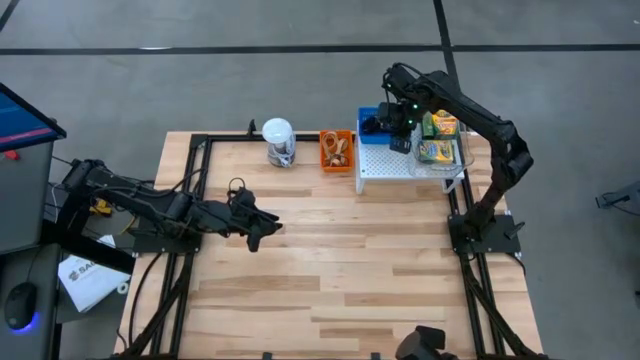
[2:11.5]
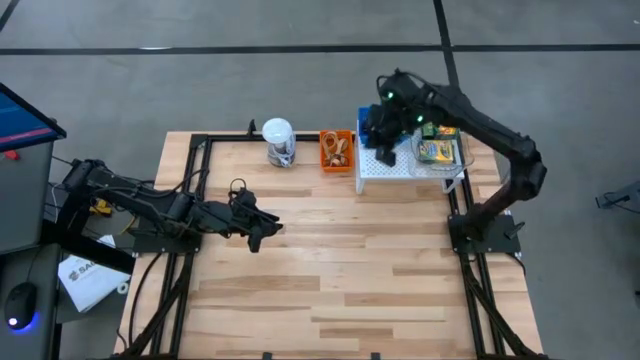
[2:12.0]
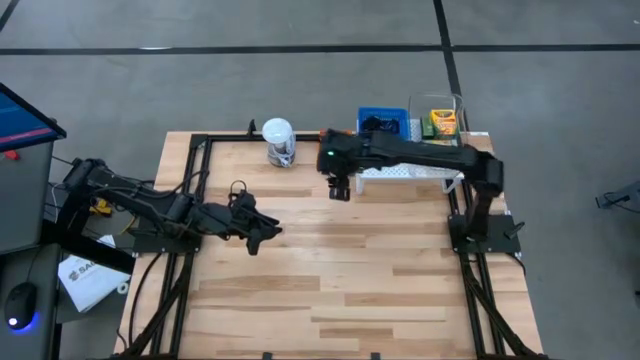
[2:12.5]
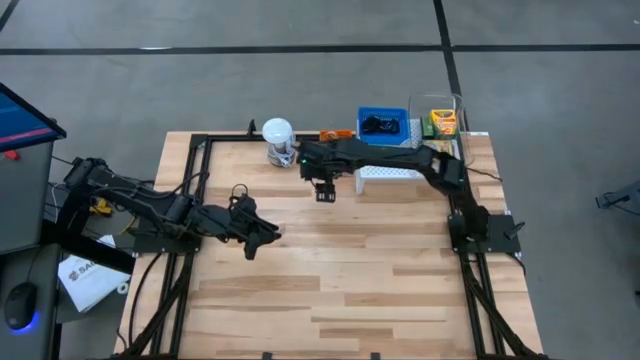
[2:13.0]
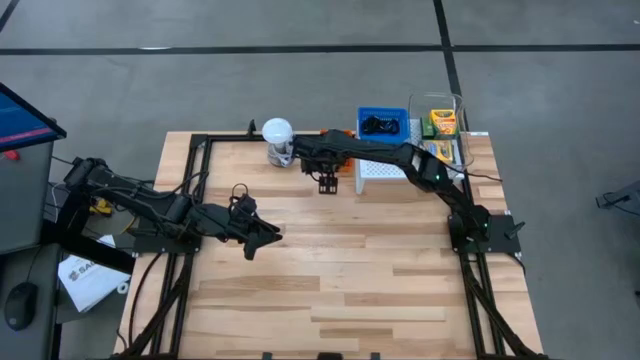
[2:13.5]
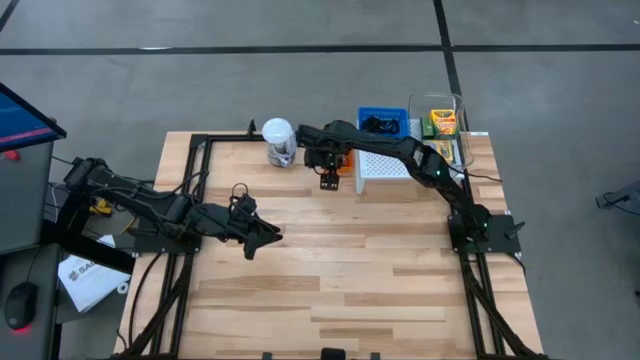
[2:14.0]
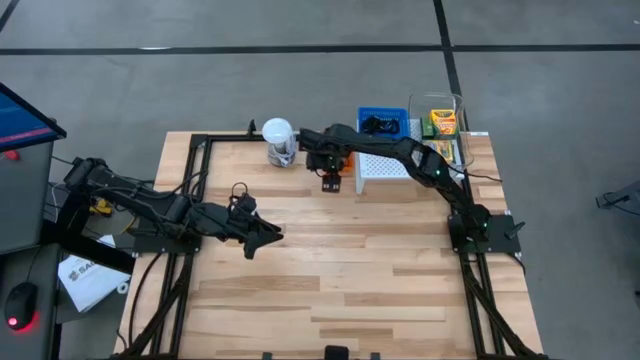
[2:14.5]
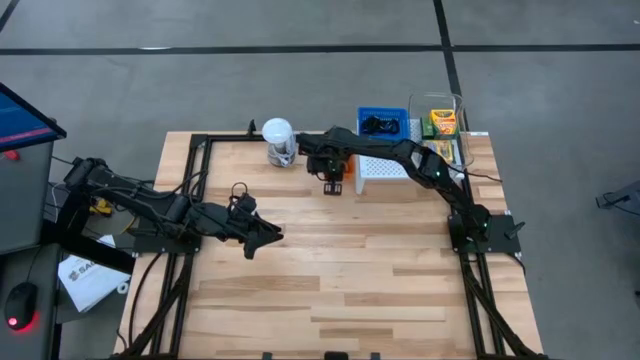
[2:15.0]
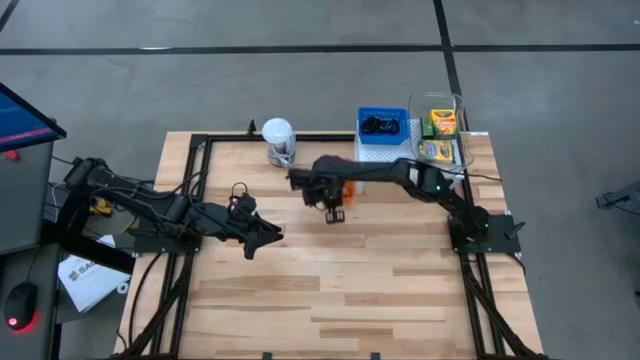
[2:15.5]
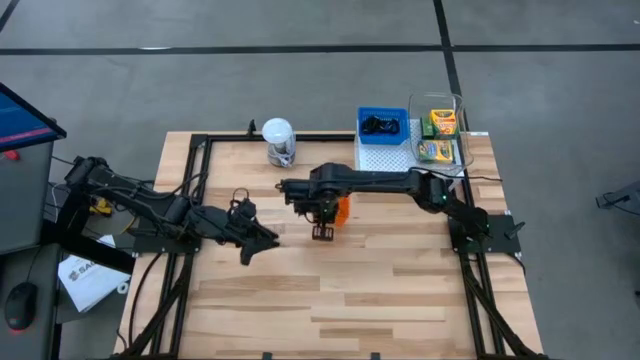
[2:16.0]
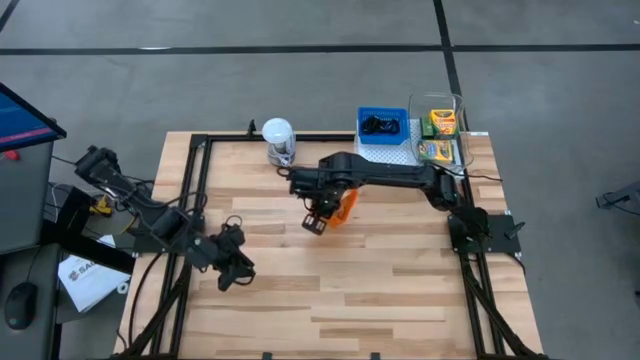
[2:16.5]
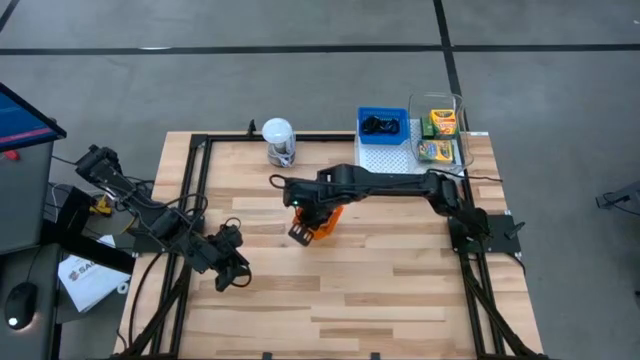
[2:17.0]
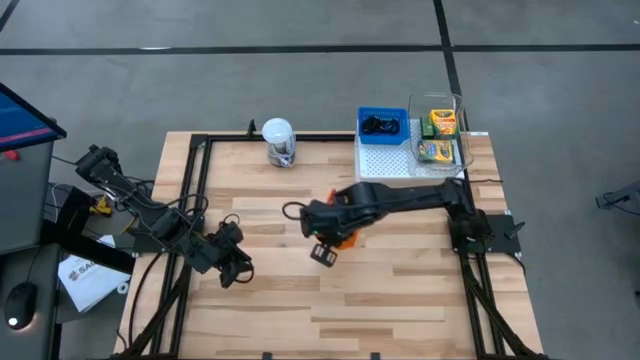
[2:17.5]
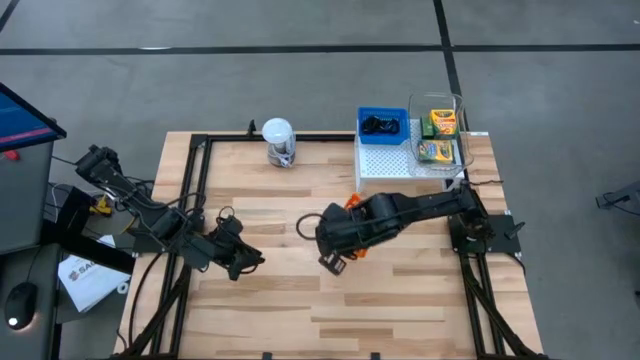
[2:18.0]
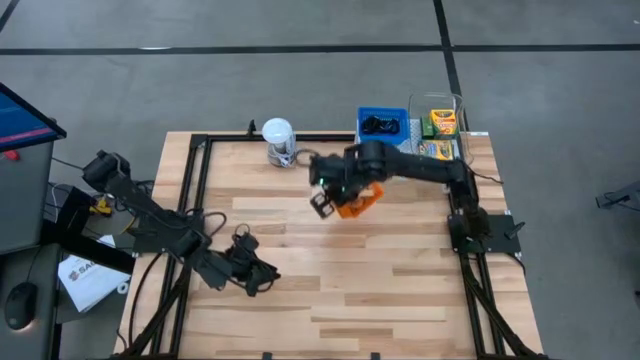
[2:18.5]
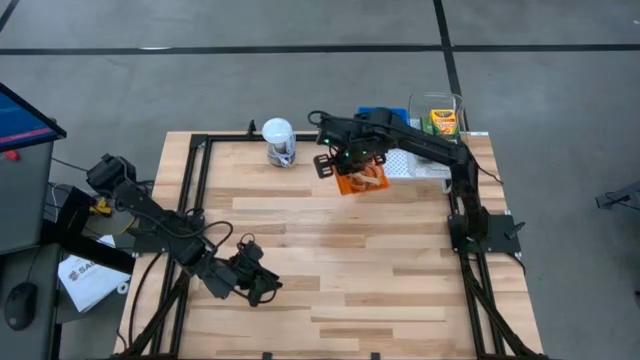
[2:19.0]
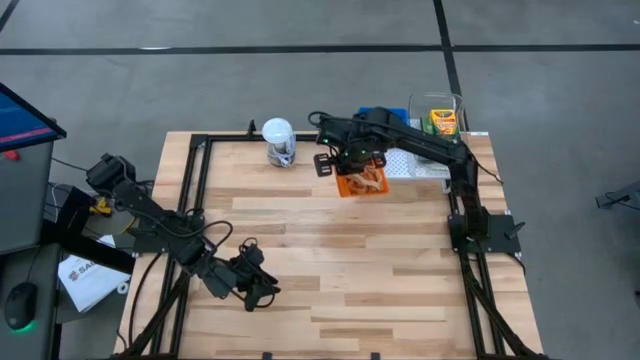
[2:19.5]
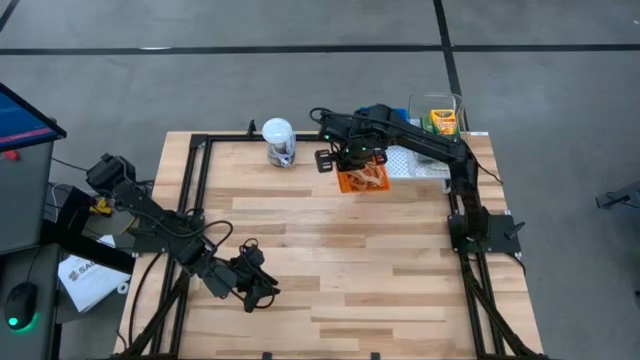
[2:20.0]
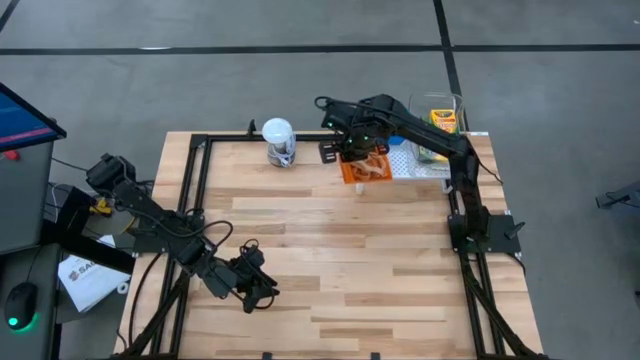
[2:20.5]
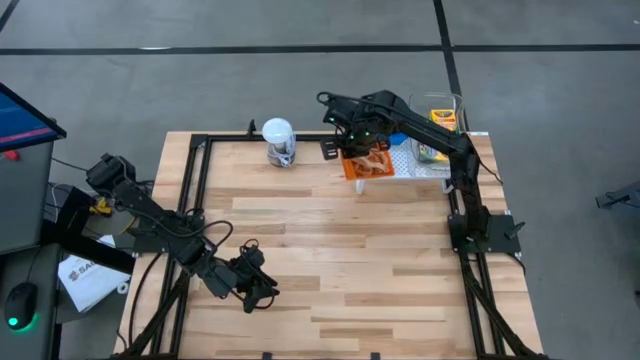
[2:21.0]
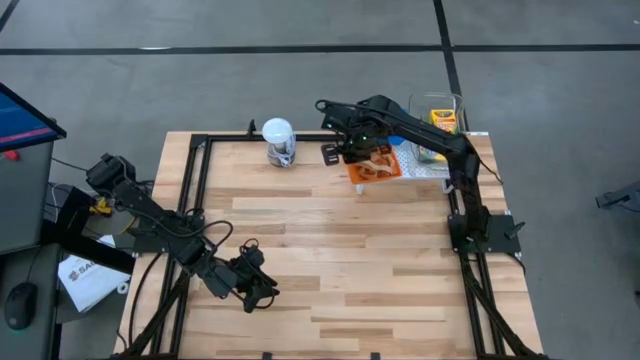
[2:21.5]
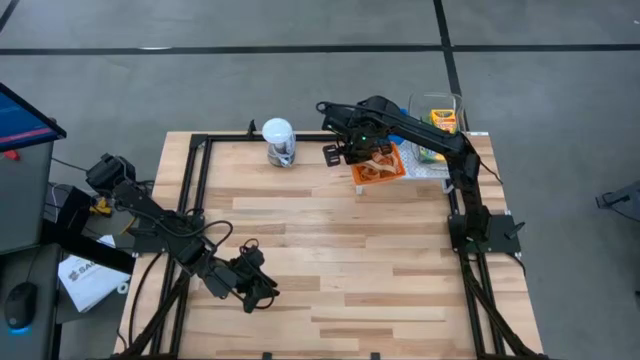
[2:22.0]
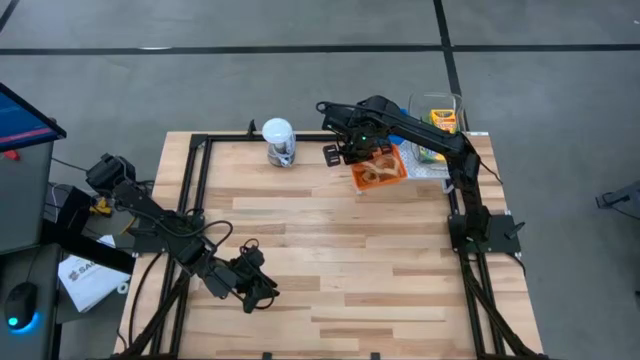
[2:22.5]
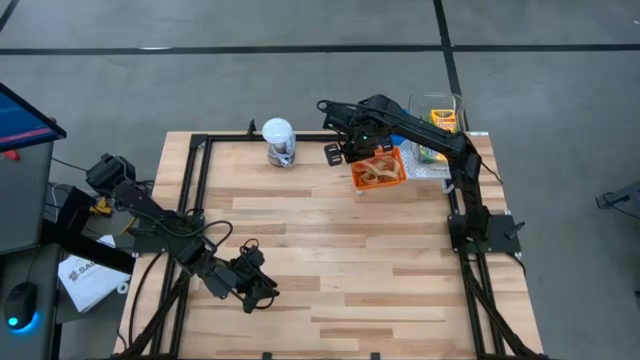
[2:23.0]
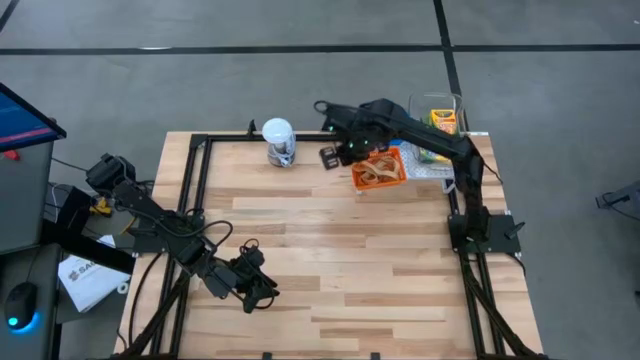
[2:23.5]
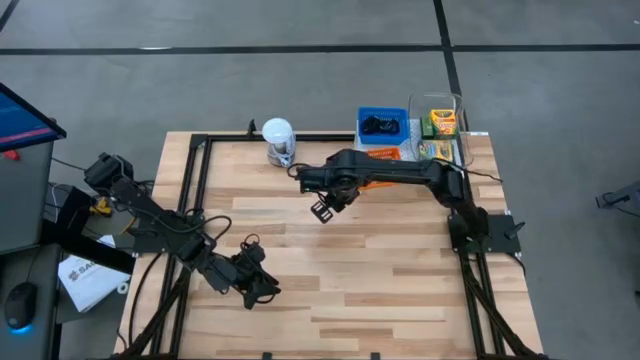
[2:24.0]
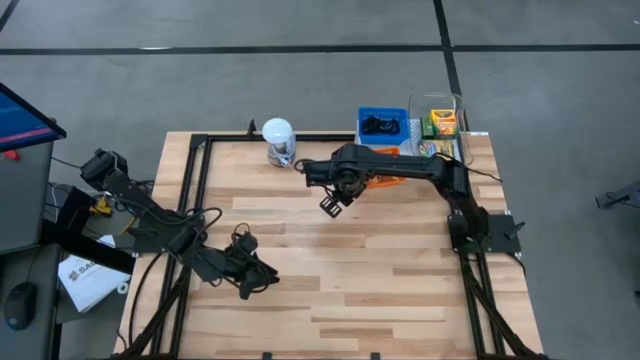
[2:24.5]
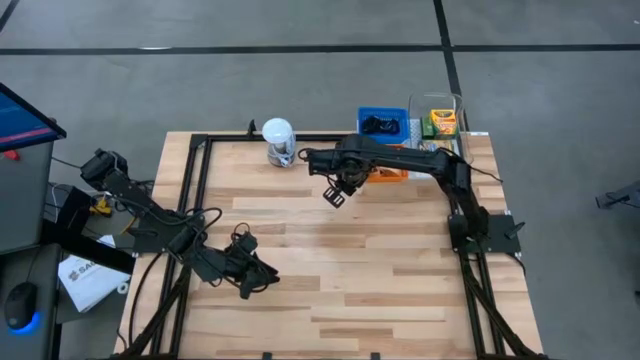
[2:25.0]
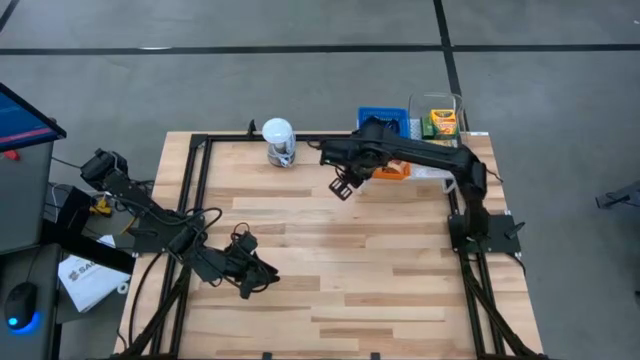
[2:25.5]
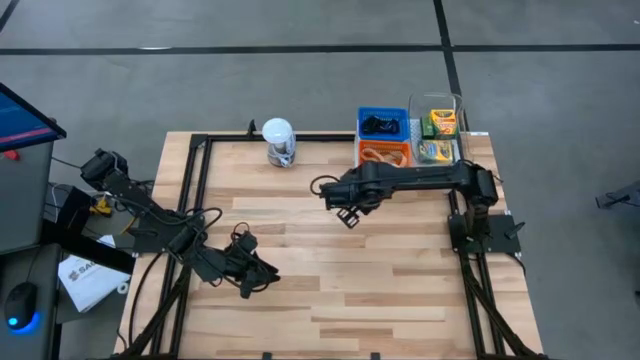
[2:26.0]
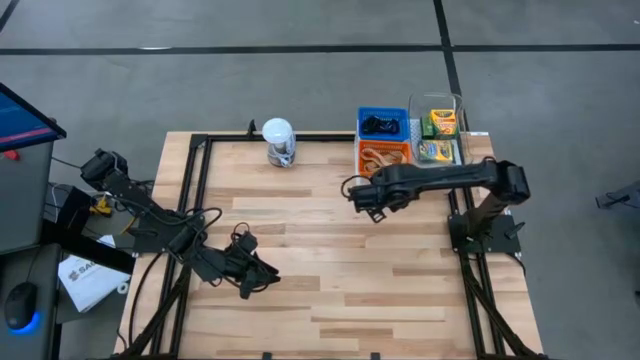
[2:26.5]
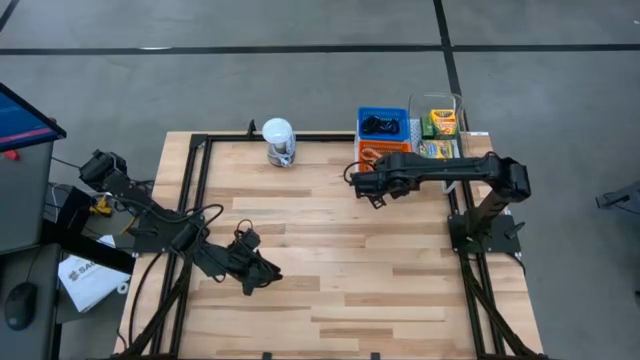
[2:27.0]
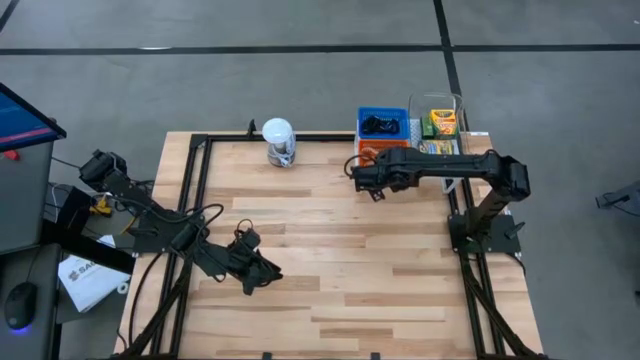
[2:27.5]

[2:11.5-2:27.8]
Task: Pick & Place Office Desk Supplies
Put the orange basket on the shelf

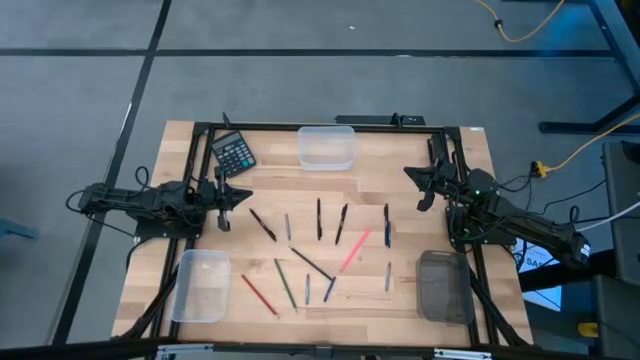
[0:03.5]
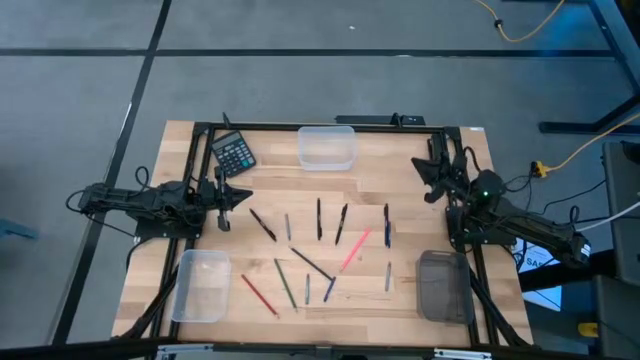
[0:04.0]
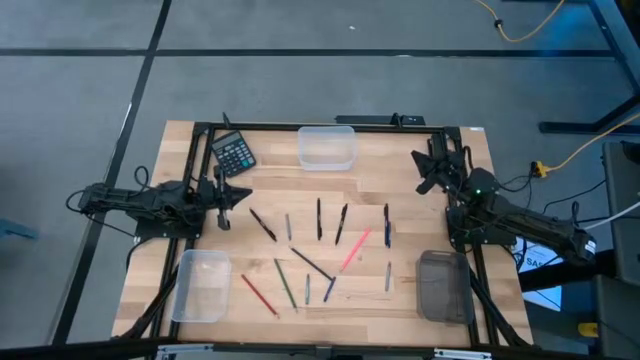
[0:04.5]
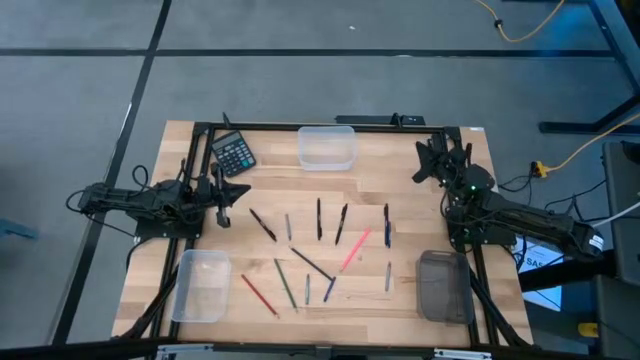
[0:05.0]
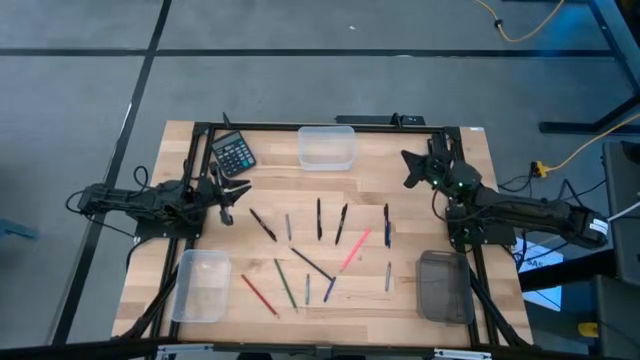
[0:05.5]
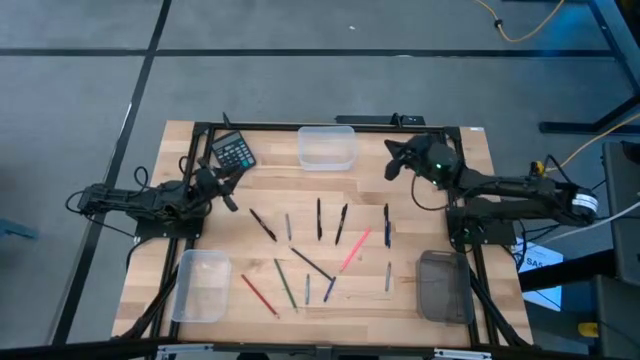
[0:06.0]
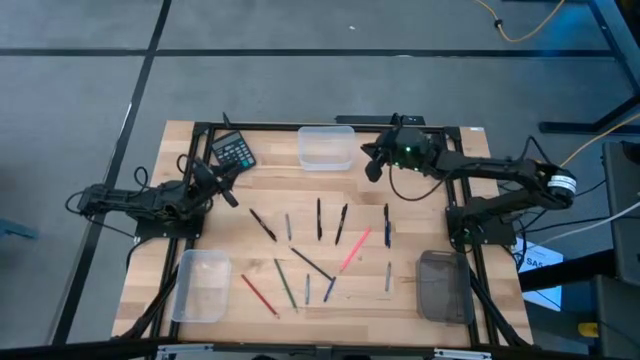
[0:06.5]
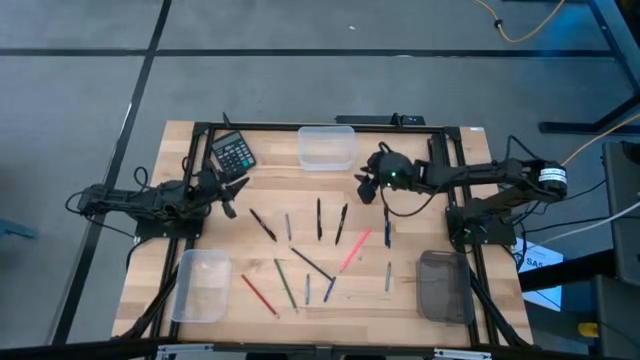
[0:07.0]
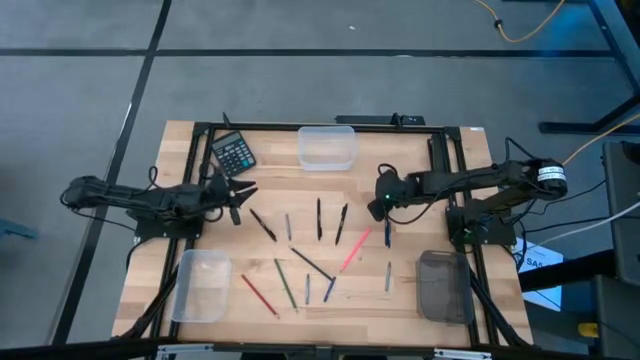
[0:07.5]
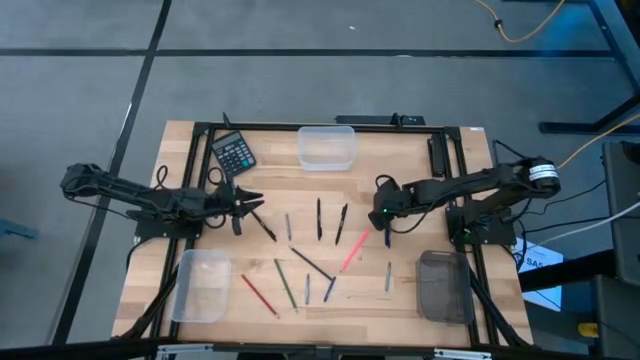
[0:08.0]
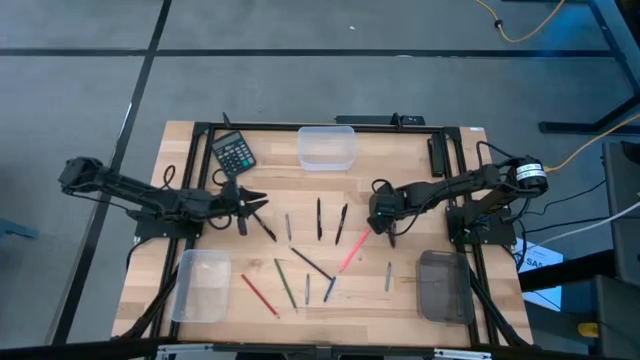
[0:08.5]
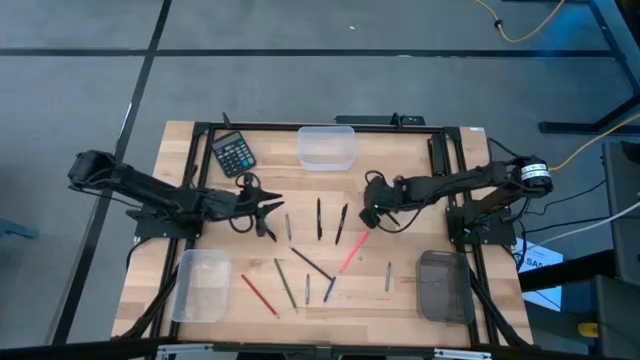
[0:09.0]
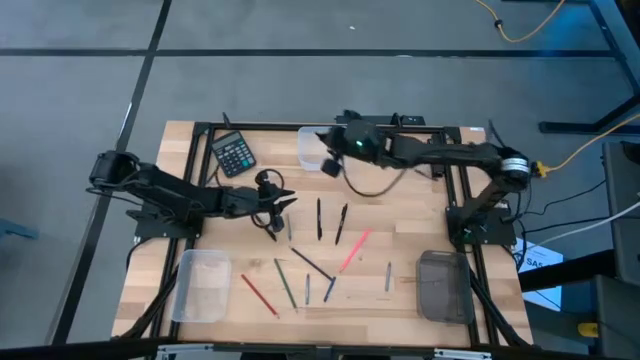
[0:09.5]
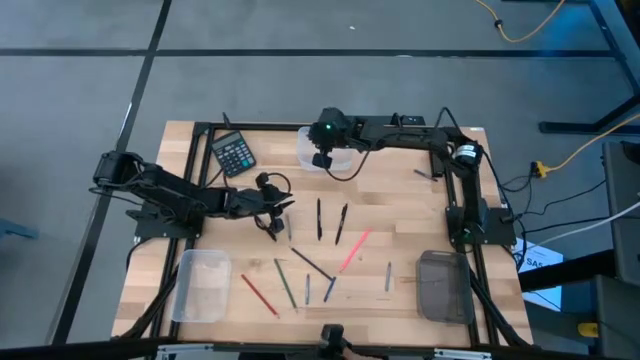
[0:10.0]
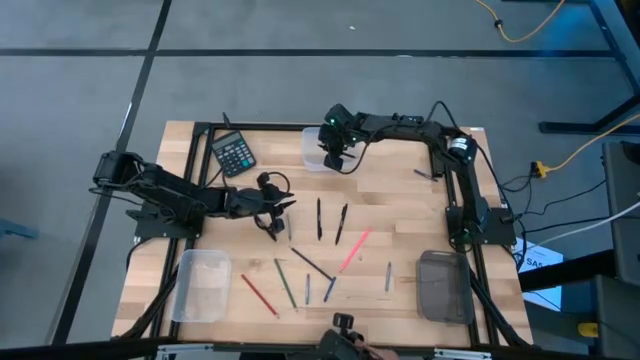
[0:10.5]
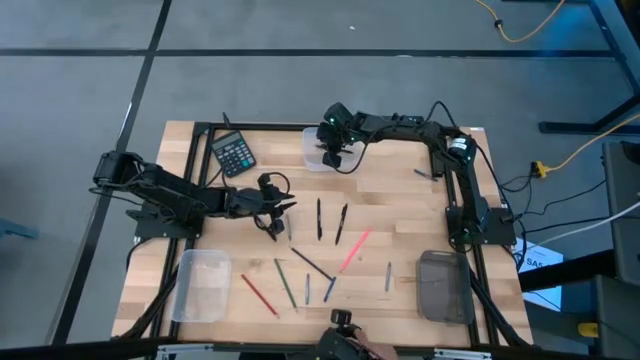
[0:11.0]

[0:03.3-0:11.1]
Task: Sort crayons/erasers/pens/pencils in bins
Put the right black pen into the top transparent bin
